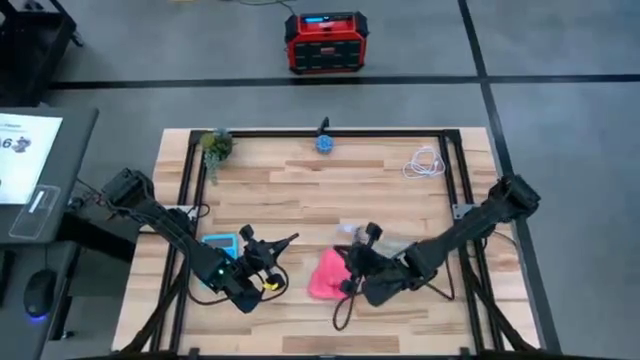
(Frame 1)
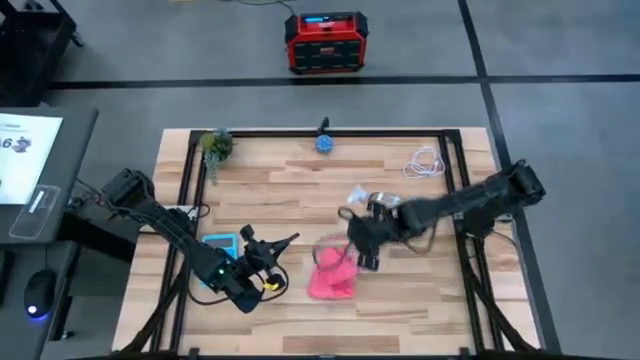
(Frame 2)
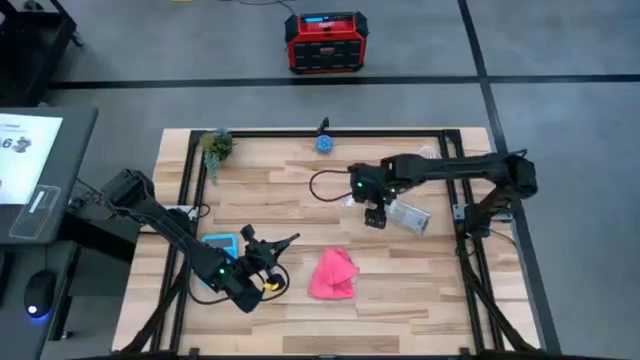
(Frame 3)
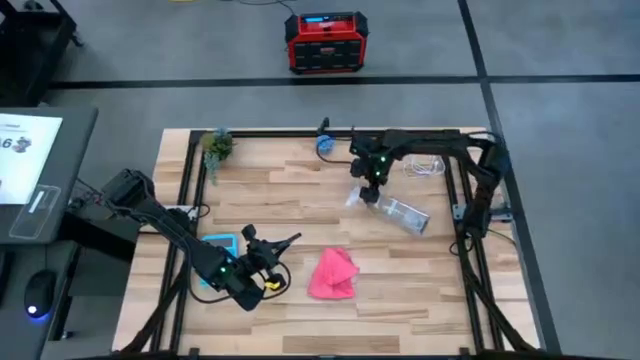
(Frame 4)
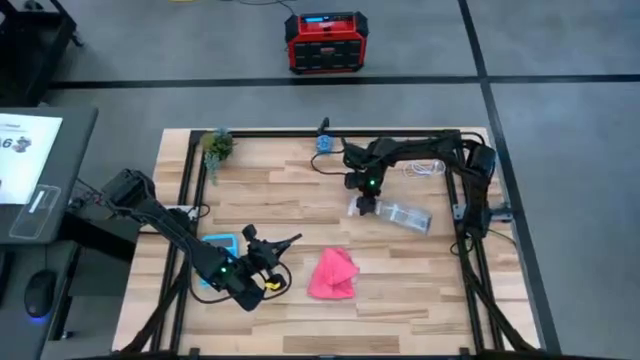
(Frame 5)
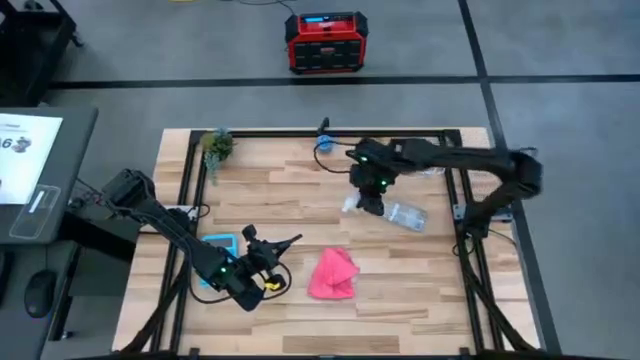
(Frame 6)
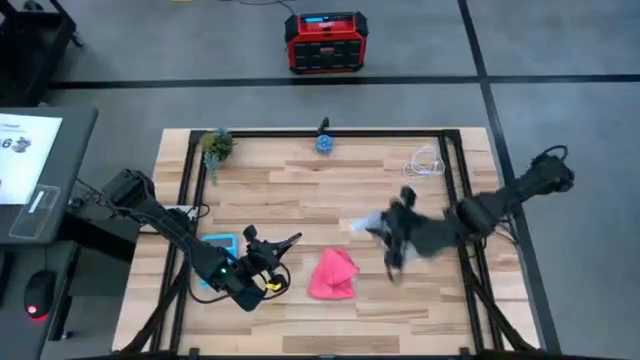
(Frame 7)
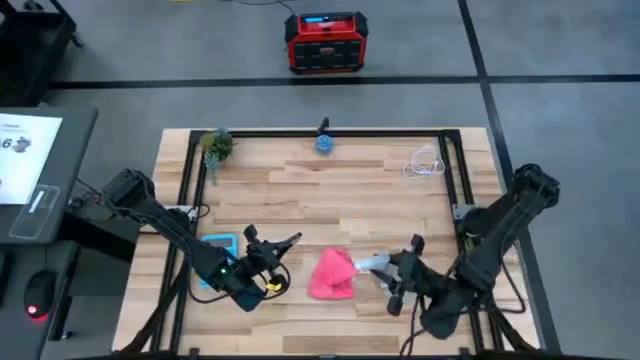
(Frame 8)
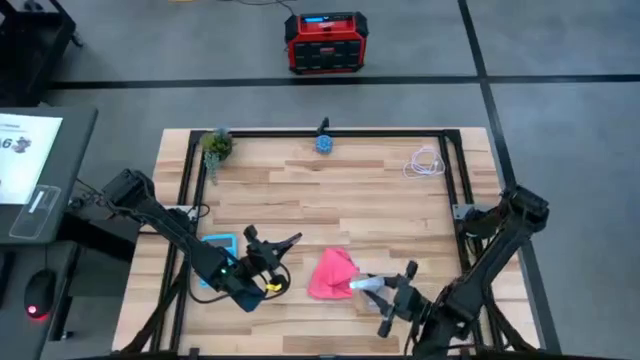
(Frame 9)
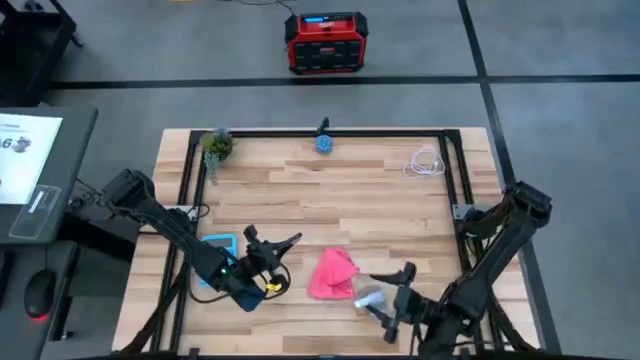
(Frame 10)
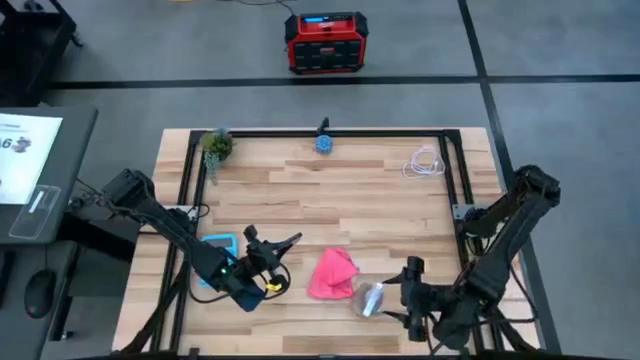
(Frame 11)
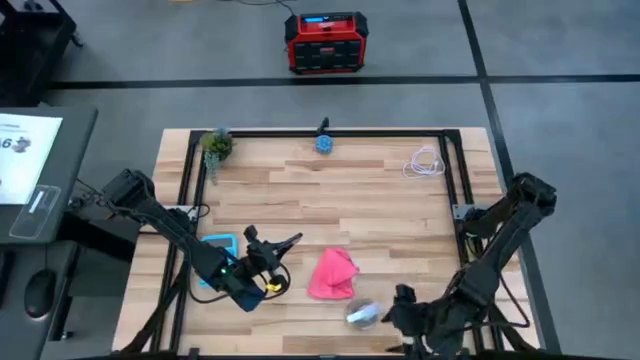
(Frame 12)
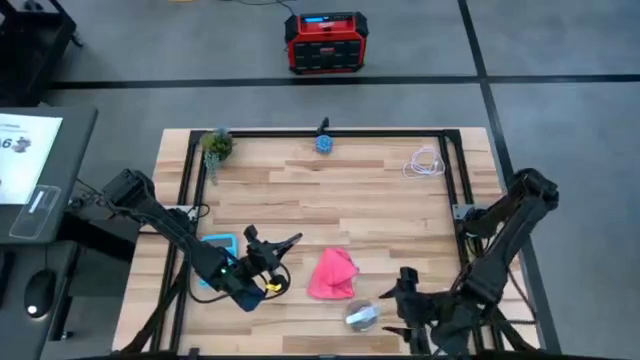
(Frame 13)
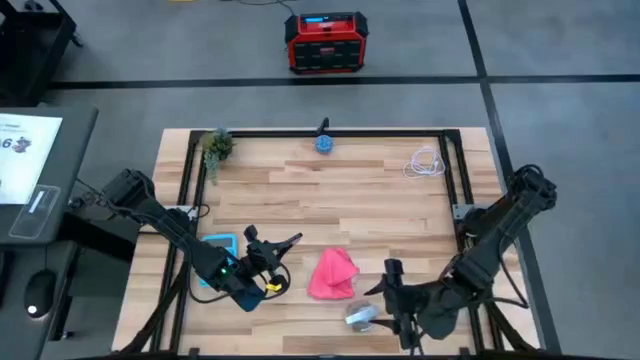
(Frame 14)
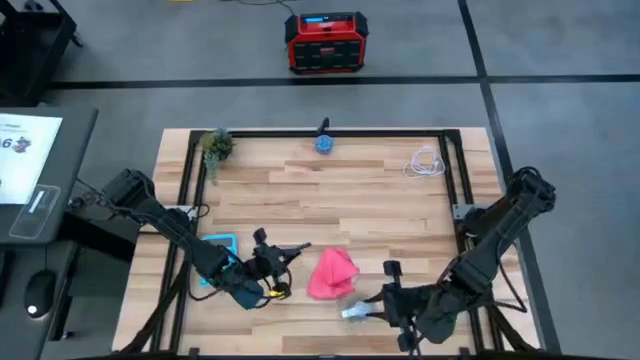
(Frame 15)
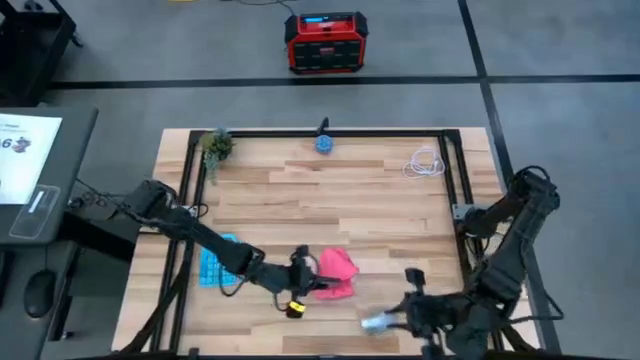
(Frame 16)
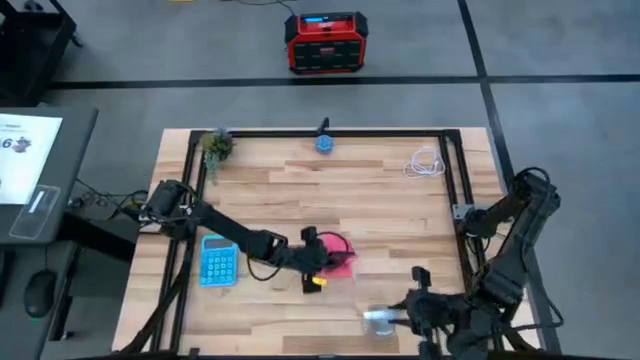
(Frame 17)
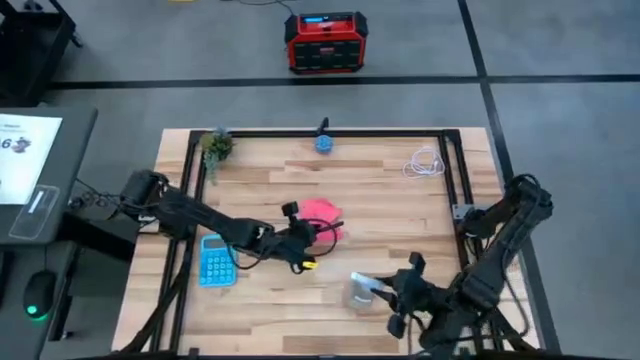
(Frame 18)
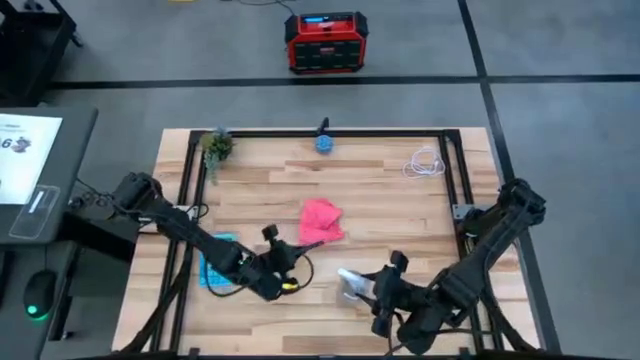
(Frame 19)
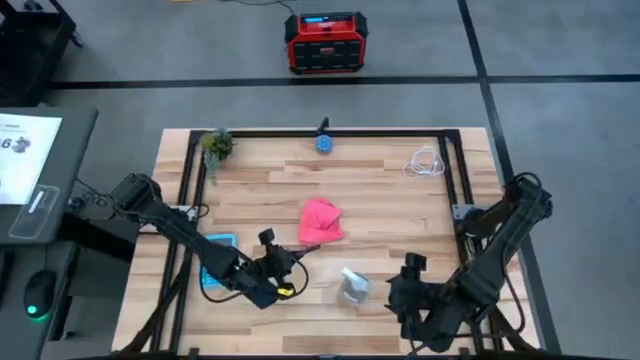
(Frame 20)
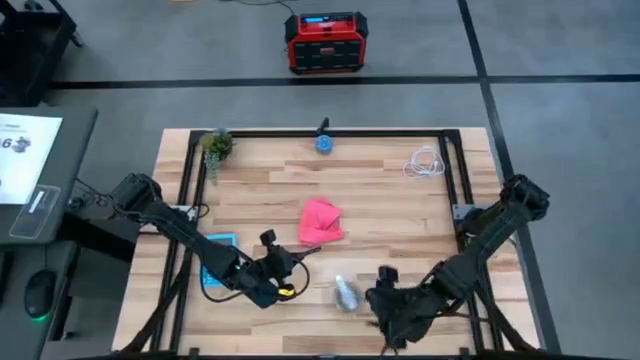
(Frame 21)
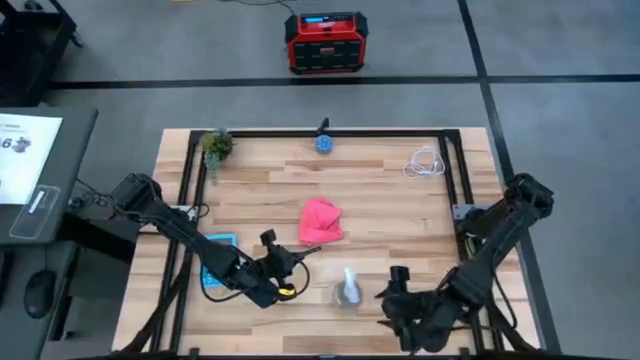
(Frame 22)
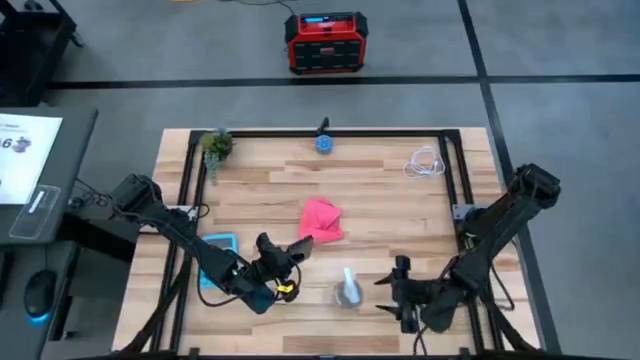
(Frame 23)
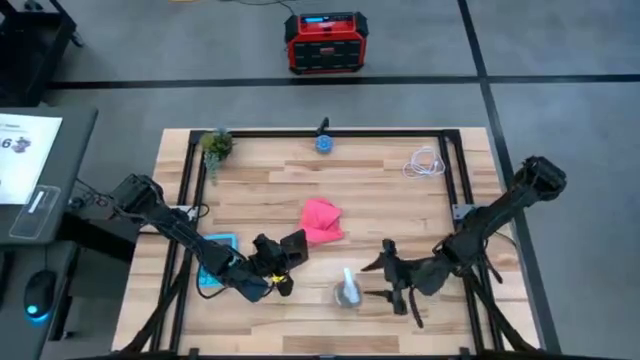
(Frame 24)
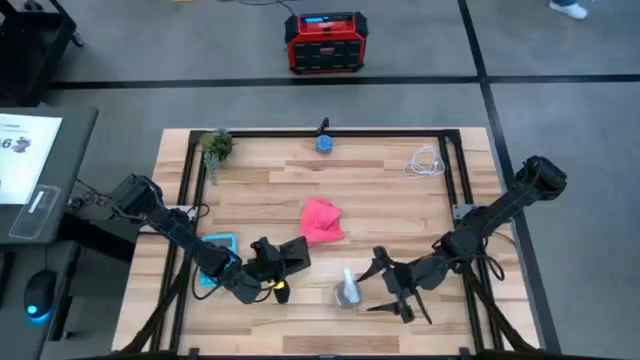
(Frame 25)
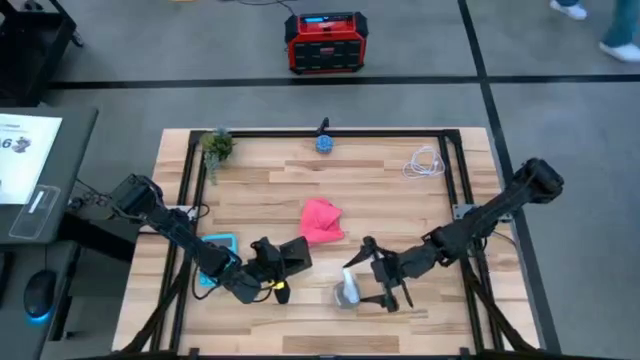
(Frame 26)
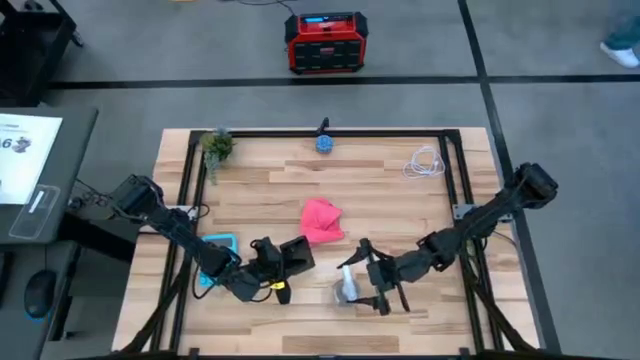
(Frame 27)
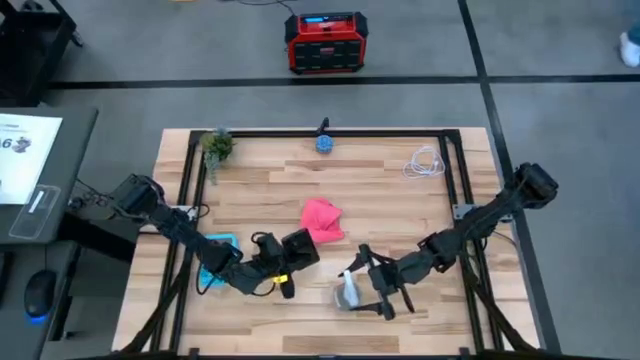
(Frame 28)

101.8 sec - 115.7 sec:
Task: Apply microfiber cloth
Spray the back of the black cellphone using transparent spray bottle

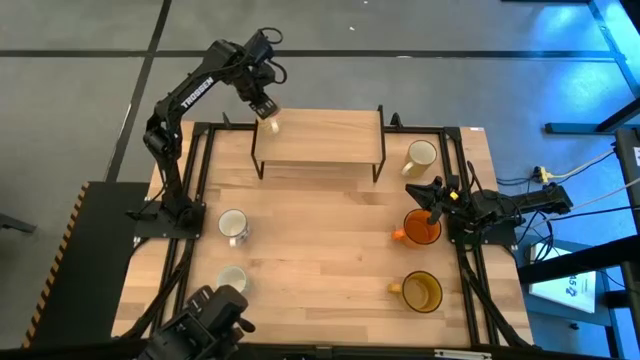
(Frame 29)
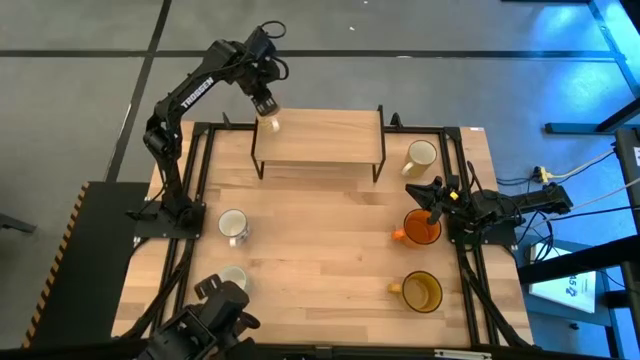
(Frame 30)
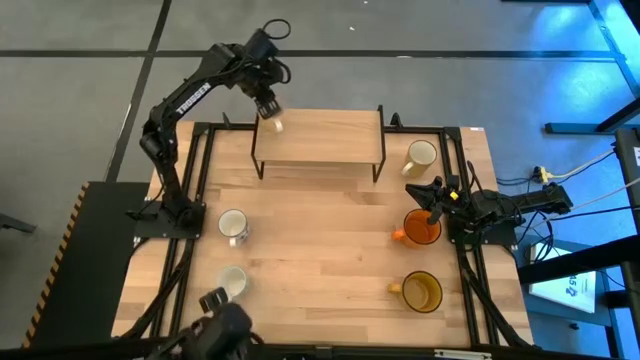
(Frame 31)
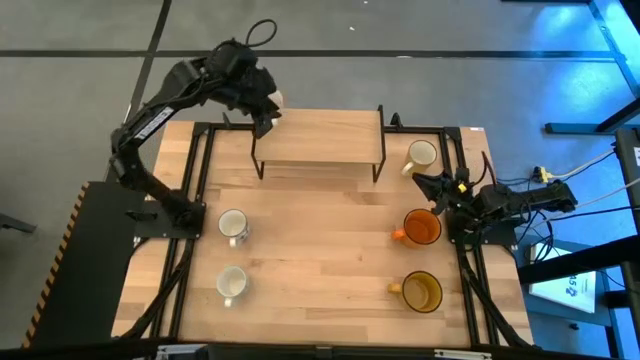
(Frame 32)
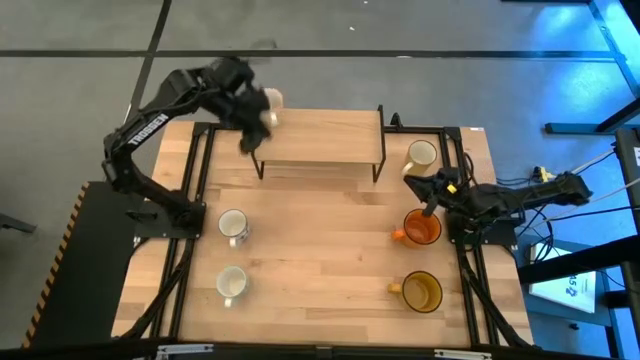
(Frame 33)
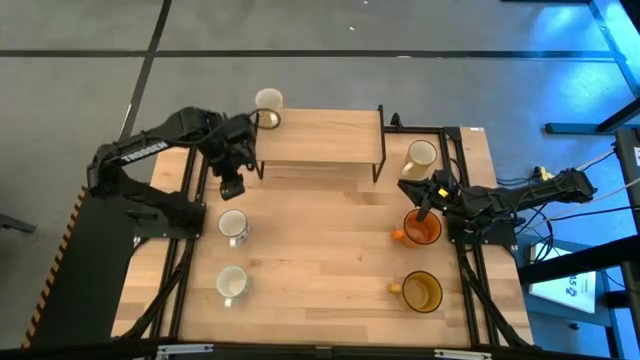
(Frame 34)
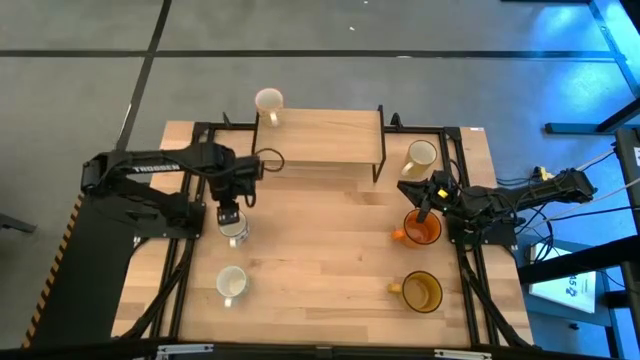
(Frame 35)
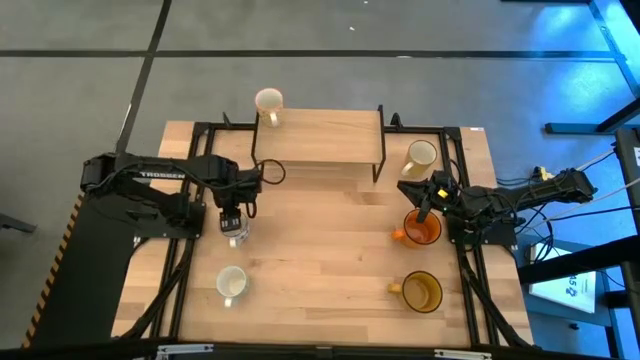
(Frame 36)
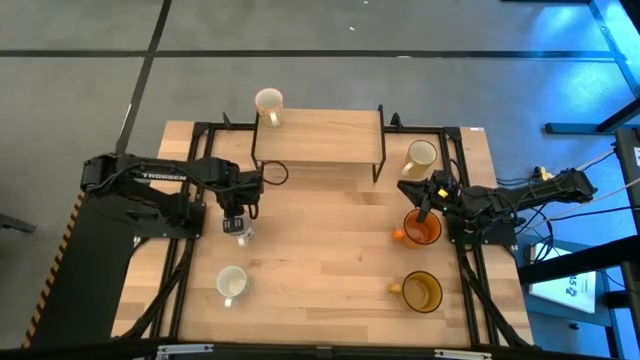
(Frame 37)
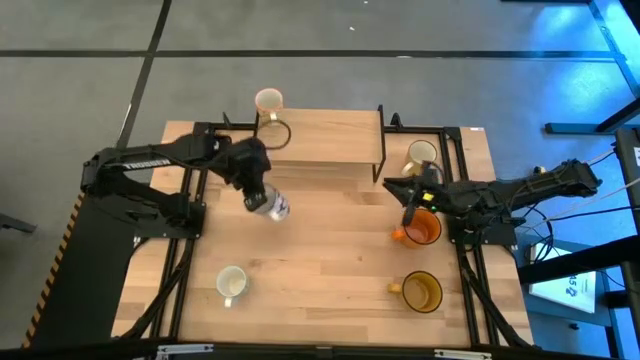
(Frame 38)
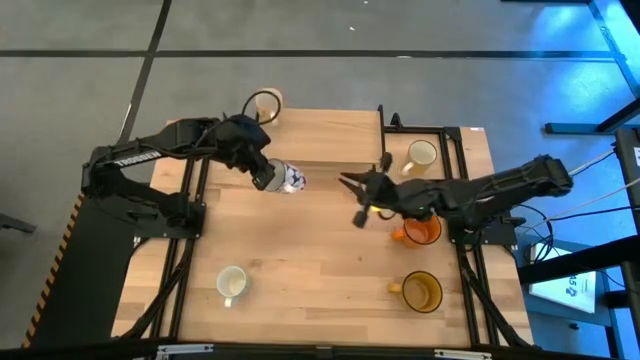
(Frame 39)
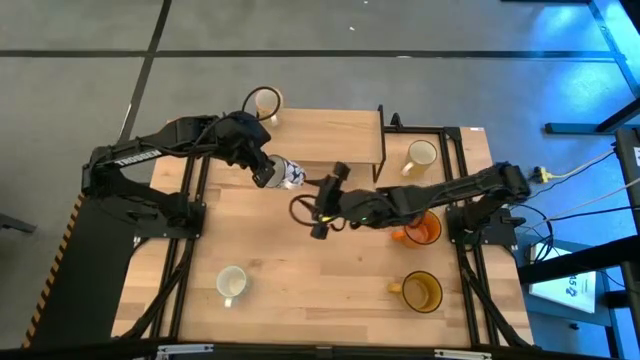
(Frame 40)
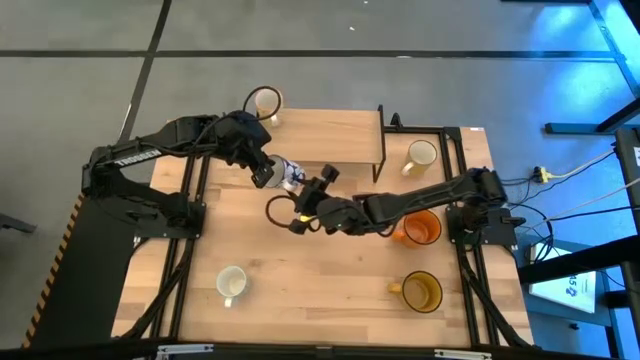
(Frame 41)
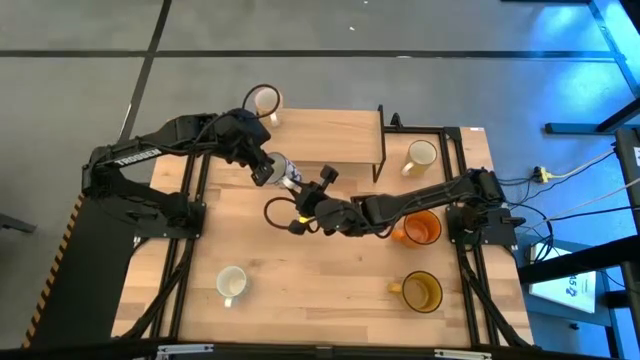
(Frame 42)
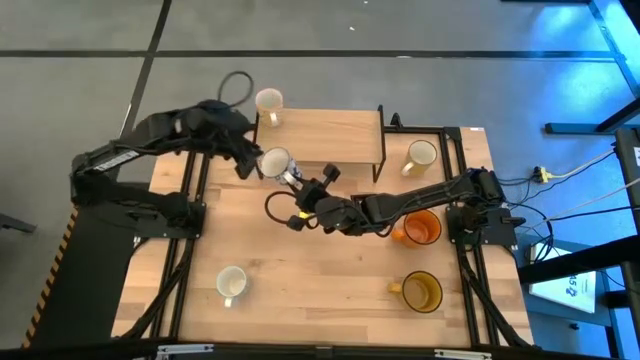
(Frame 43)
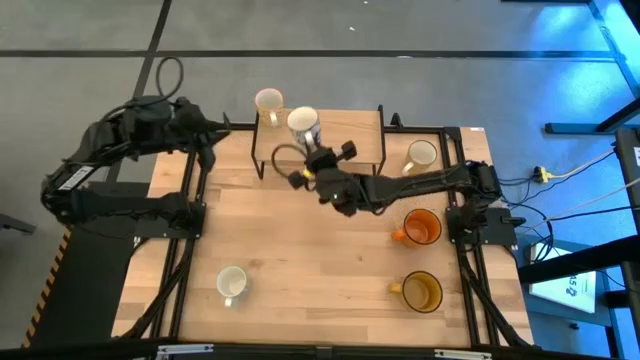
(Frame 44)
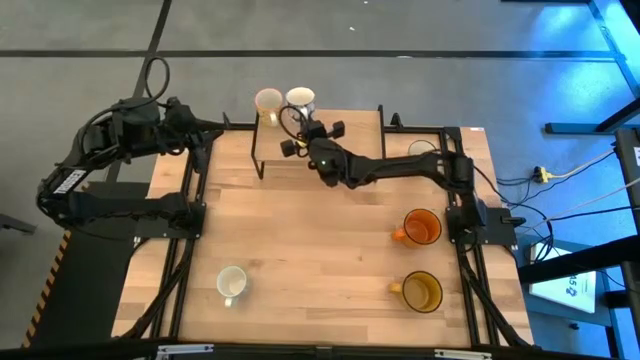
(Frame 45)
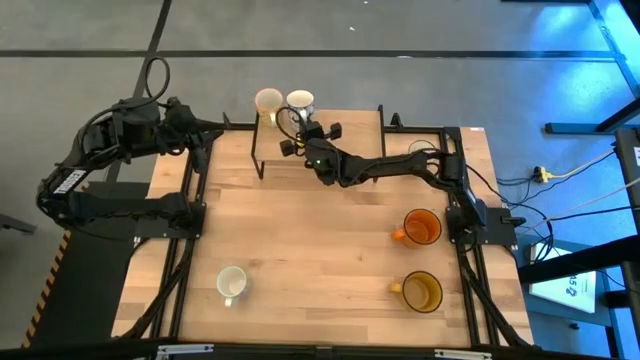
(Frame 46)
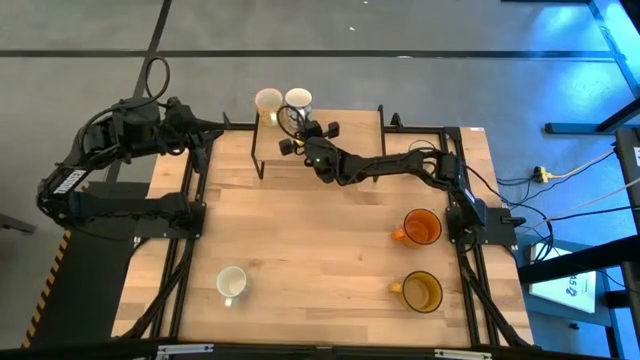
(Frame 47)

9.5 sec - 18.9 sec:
Task: Place coffee mugs
Put the blue patterned mug on the shelf
